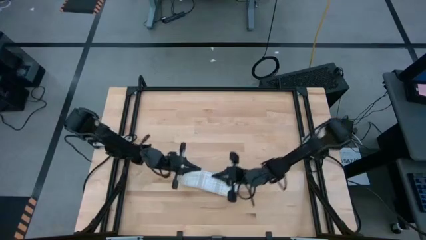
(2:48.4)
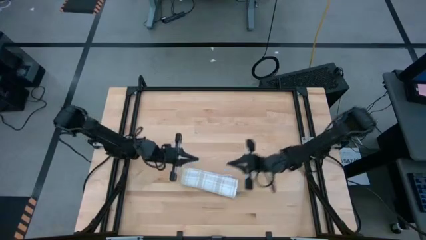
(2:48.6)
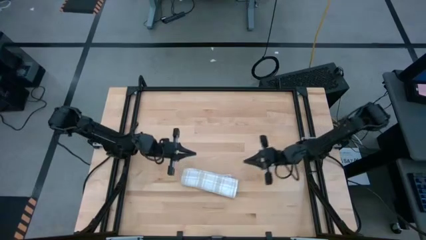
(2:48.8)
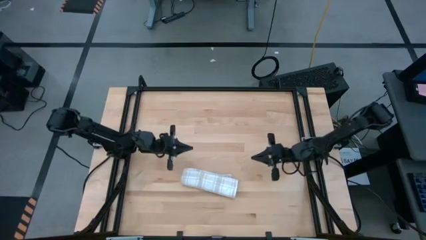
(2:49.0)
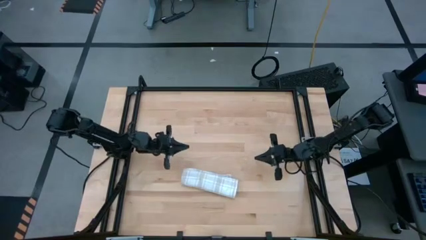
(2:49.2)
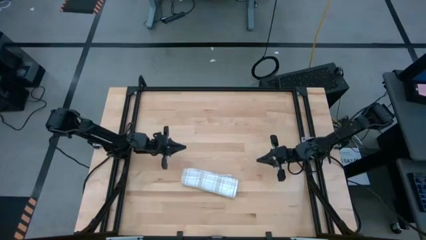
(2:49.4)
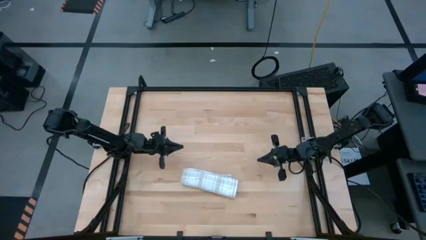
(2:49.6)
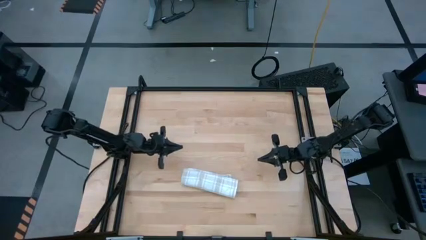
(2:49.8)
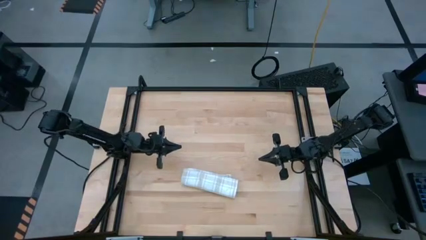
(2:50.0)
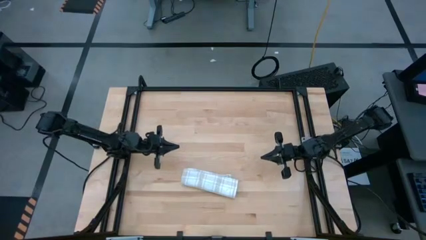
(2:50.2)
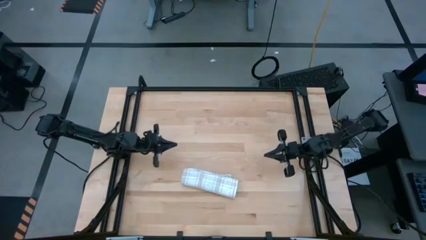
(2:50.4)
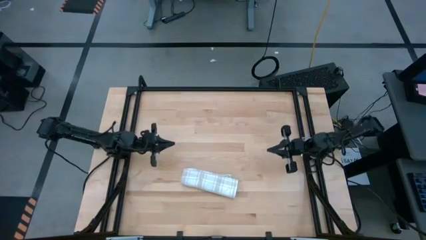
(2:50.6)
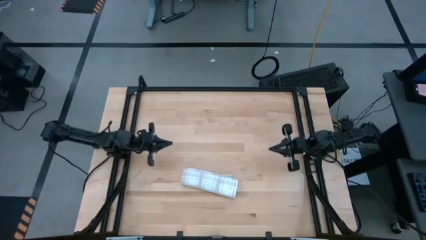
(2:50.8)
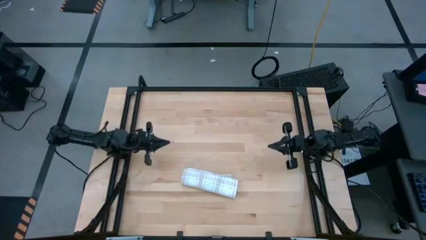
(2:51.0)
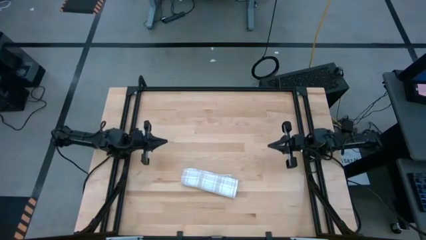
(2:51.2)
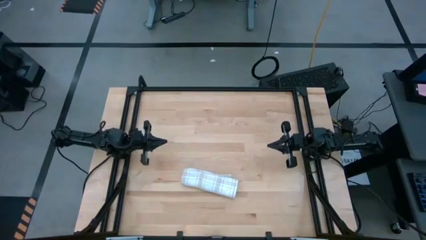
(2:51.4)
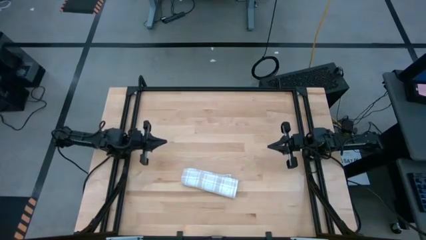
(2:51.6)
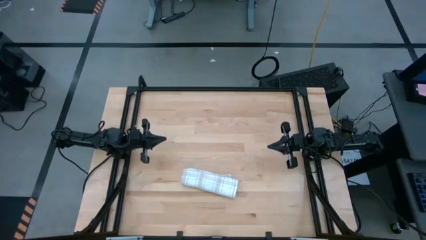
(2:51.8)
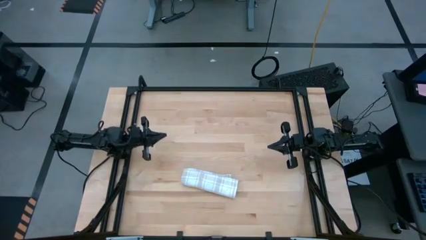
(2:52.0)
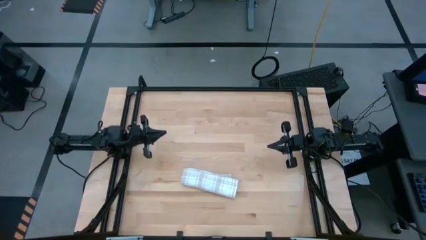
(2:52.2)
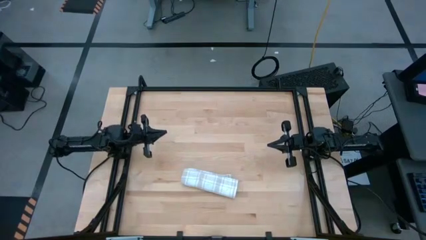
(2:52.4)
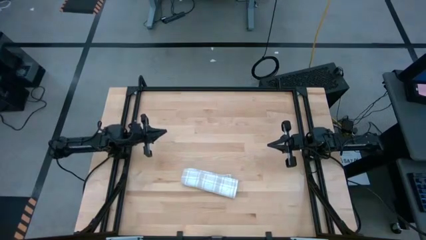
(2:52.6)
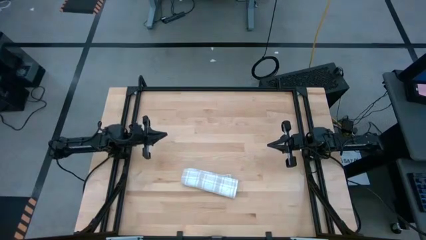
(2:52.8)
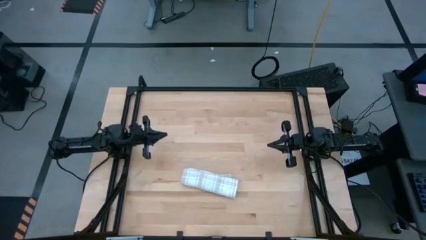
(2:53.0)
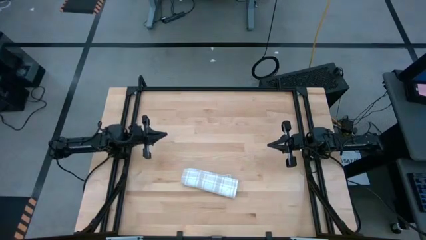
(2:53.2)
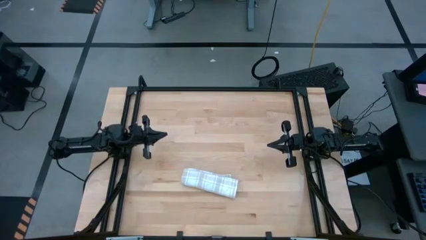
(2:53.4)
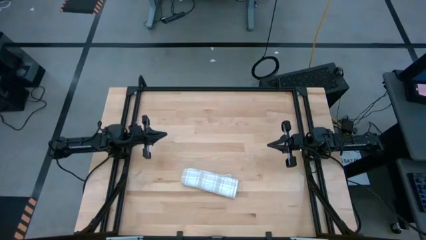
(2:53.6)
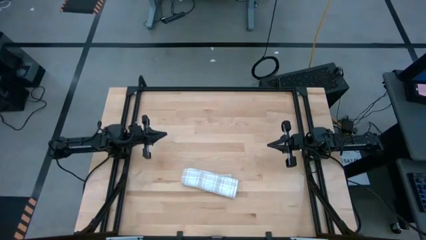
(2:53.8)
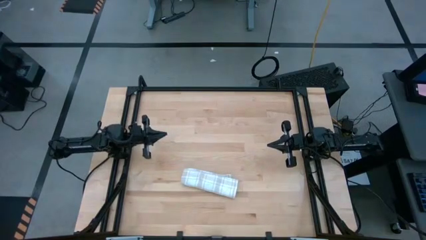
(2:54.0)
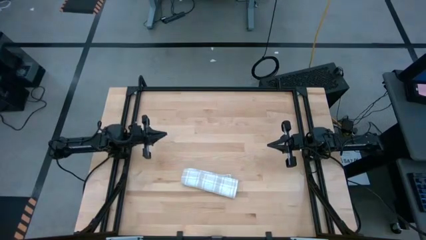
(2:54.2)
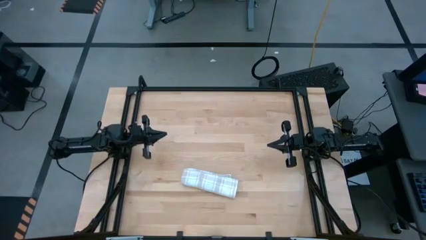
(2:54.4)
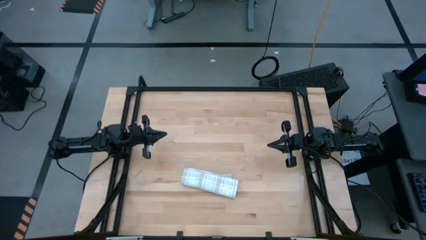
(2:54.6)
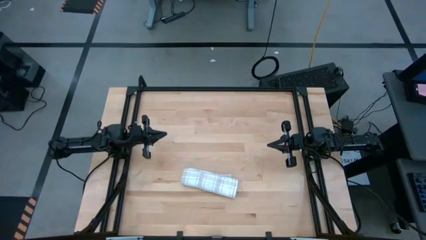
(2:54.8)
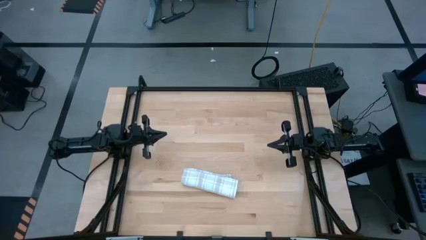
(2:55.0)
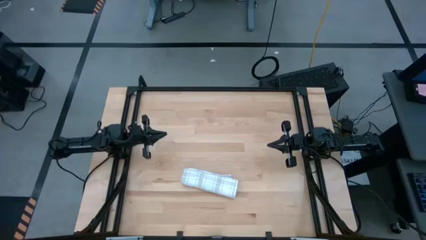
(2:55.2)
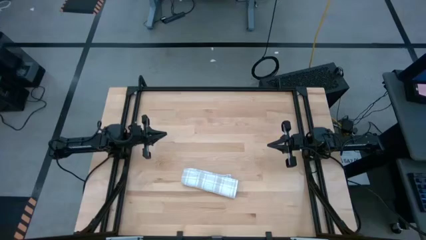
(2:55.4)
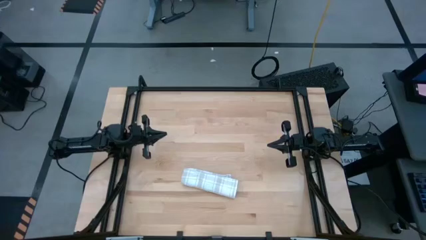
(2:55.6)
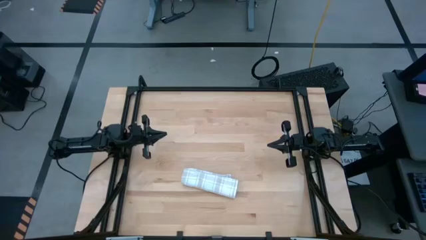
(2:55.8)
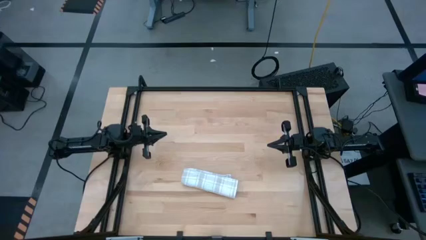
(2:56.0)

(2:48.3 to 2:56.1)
Task: Roll towel
Return to Home Position

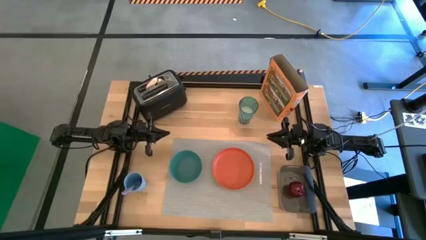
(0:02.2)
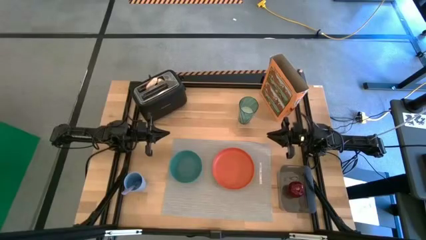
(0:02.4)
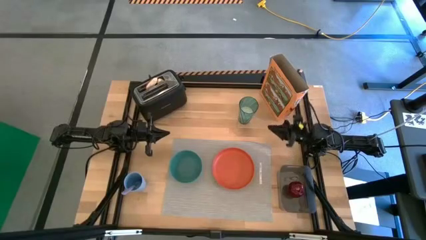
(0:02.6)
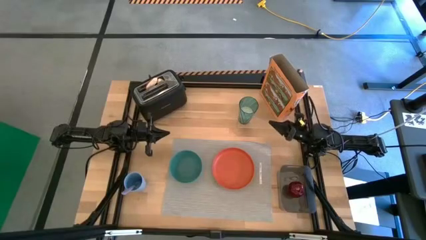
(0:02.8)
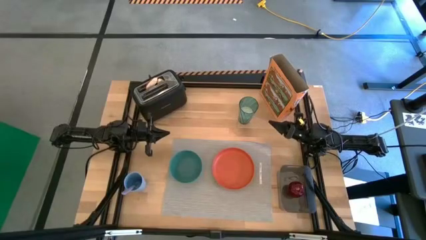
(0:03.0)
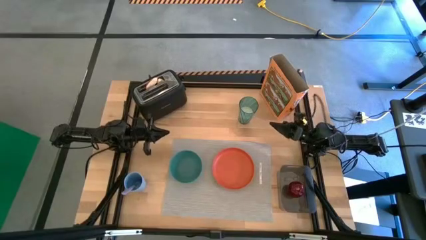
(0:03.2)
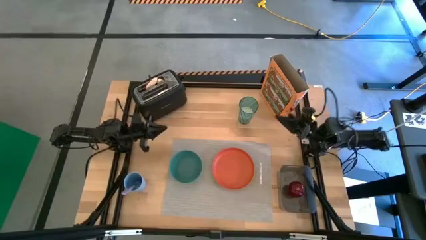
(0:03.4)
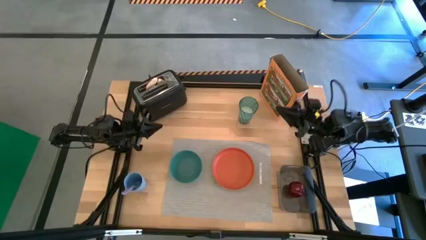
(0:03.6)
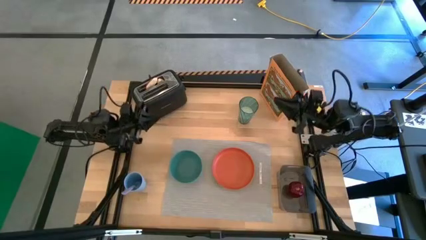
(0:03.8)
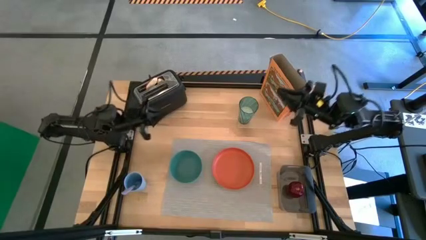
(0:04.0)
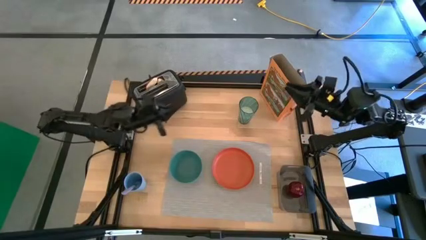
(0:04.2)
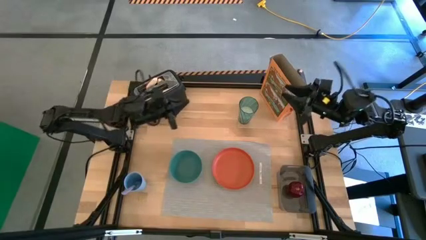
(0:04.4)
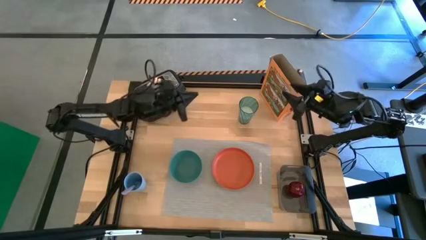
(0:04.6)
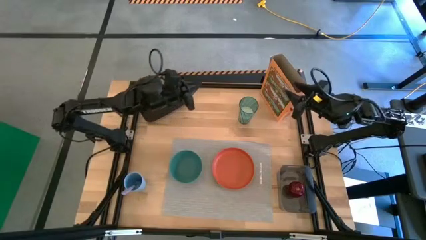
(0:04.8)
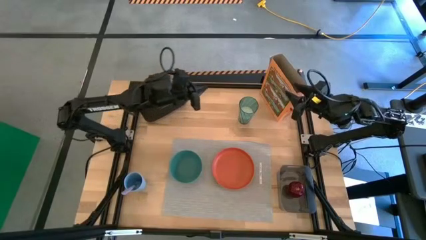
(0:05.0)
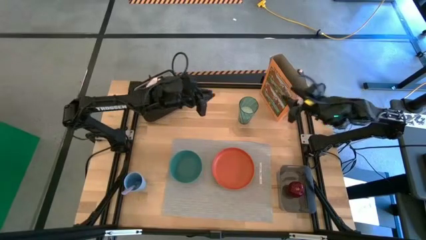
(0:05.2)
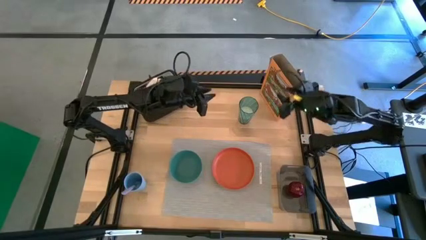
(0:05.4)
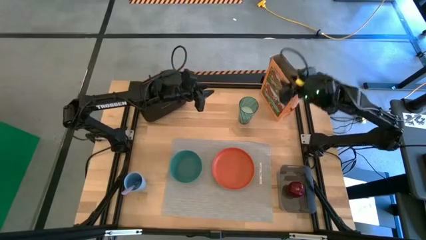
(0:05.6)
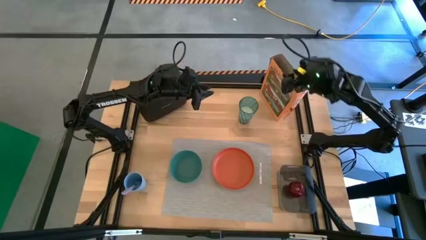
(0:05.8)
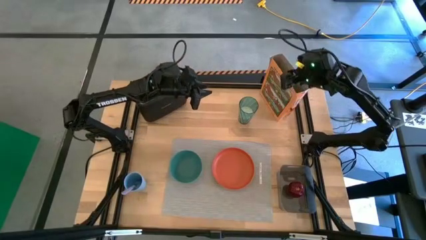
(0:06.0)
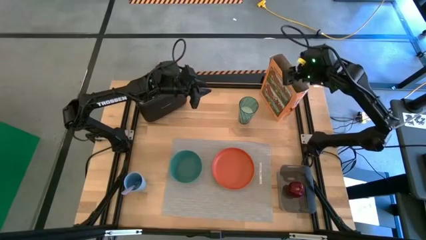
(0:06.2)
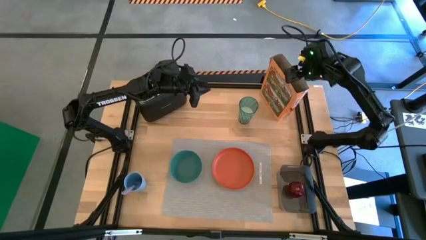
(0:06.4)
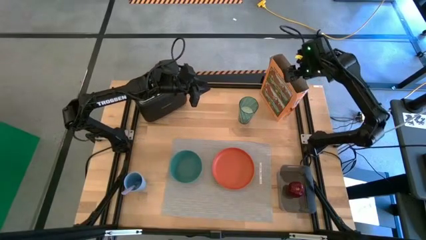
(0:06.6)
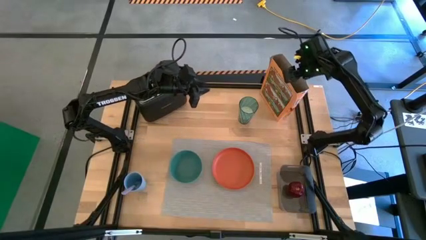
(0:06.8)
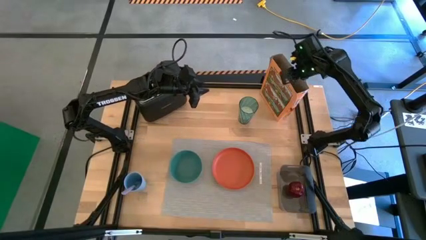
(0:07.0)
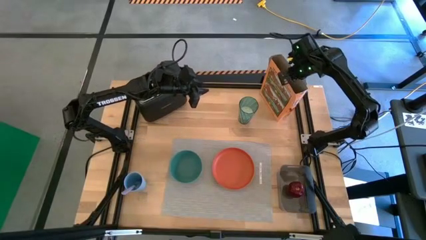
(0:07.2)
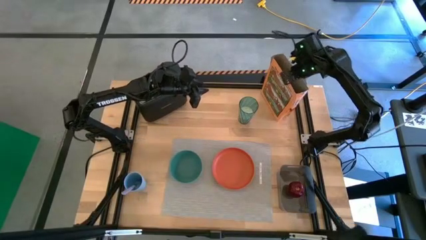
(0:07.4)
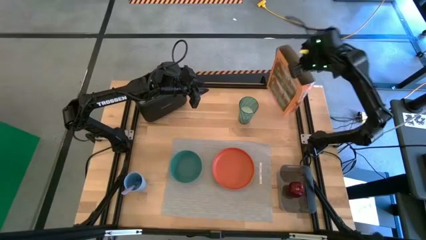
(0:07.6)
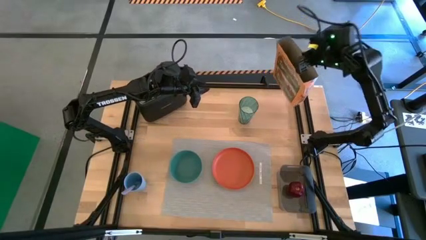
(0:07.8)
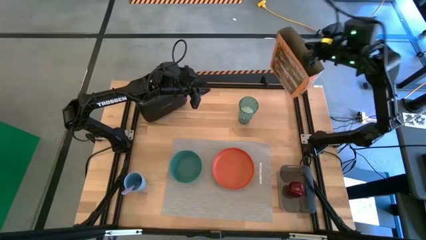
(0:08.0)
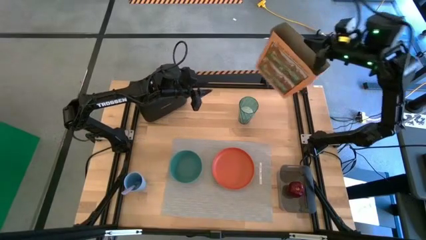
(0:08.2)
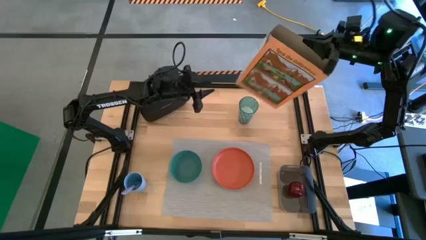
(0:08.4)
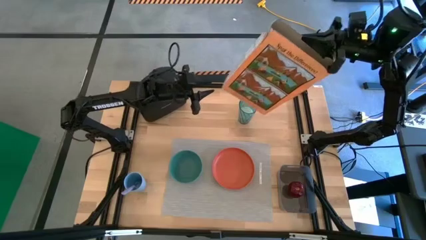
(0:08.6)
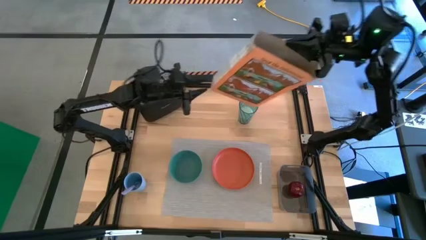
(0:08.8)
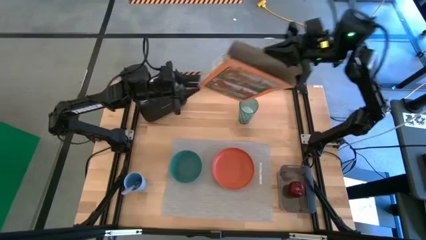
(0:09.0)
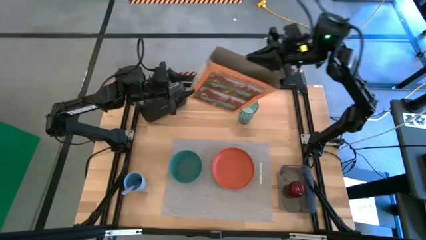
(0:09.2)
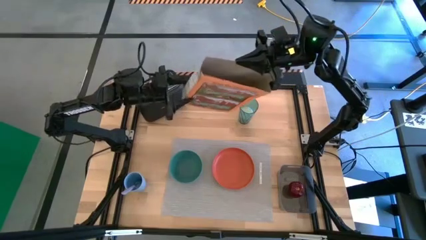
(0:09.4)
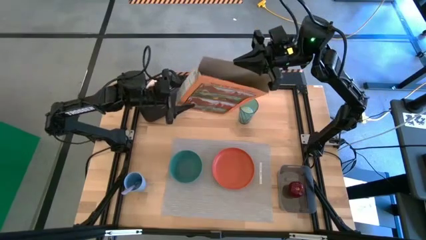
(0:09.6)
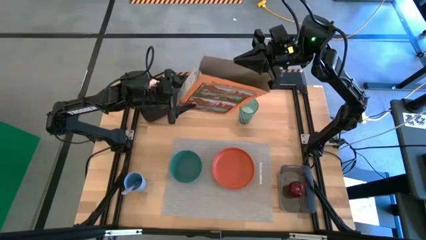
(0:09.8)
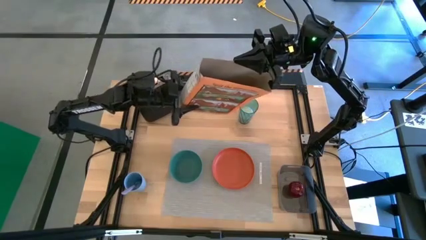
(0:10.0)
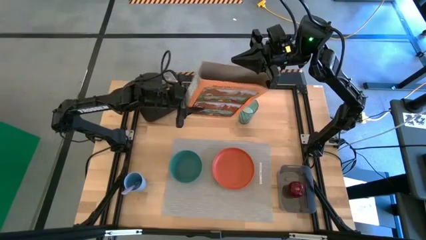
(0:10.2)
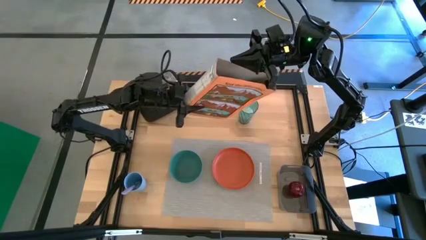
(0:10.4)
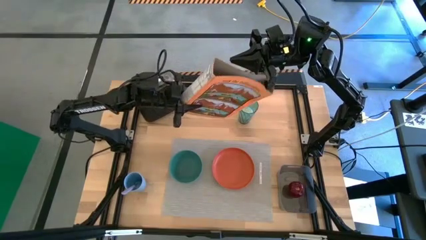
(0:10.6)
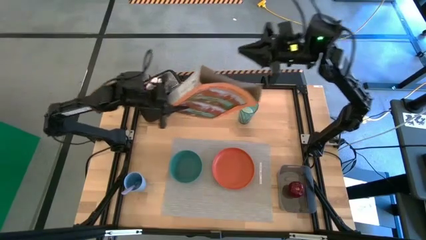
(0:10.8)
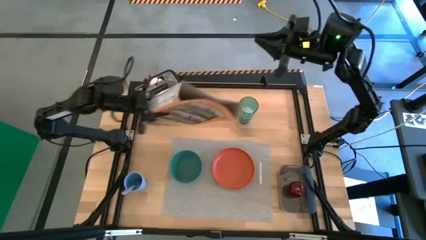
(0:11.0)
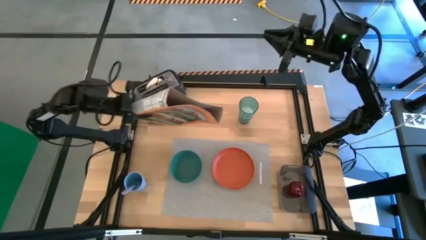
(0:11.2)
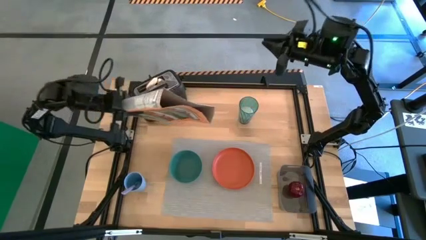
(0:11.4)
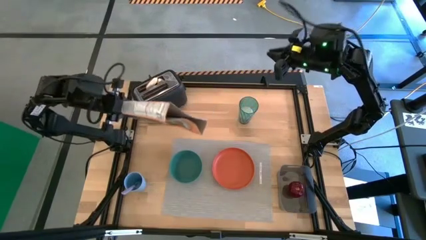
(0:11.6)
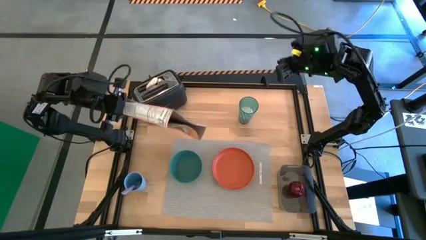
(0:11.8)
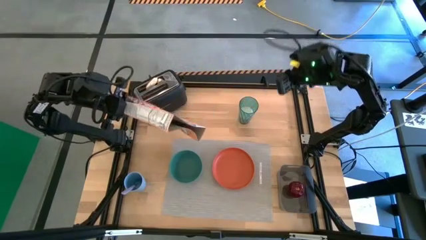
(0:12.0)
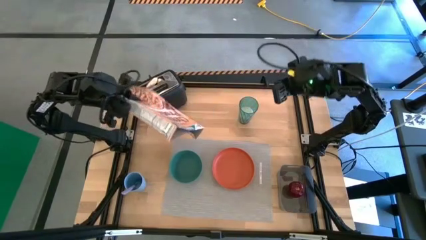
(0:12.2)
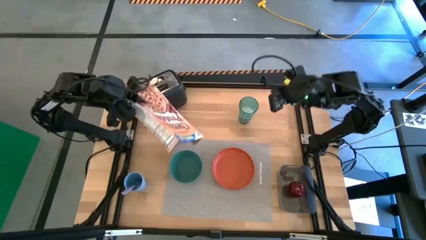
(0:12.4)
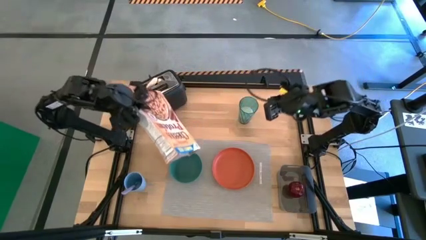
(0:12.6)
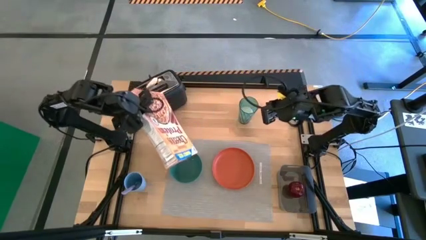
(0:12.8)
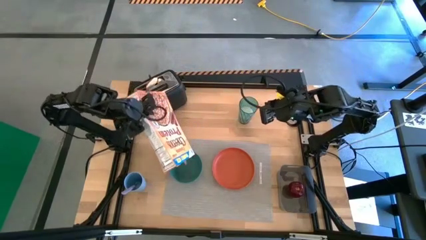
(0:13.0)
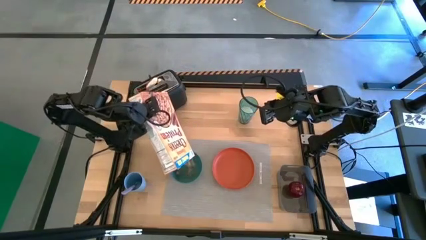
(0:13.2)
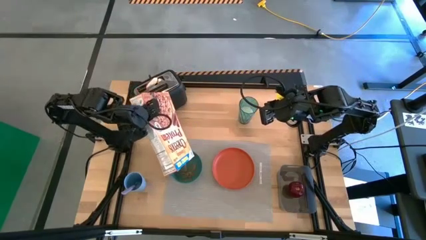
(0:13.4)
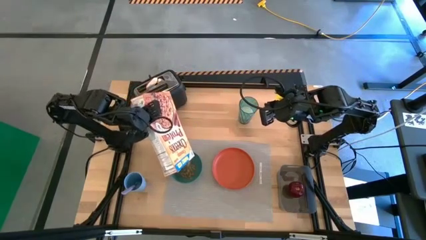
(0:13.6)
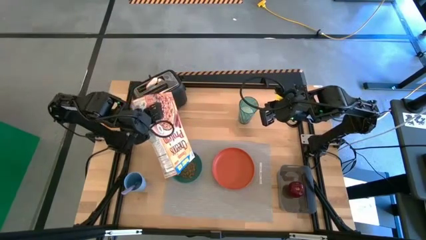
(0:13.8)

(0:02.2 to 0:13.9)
Task: Arrange a breakfast setting
Pour the cereals into the green bowl
